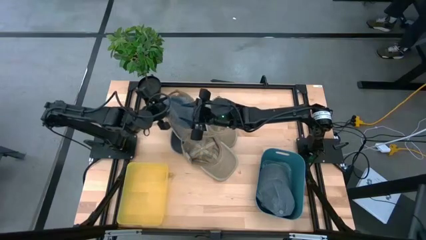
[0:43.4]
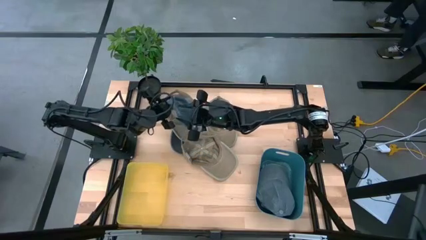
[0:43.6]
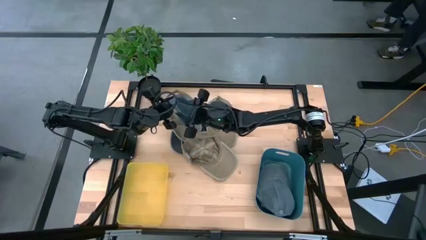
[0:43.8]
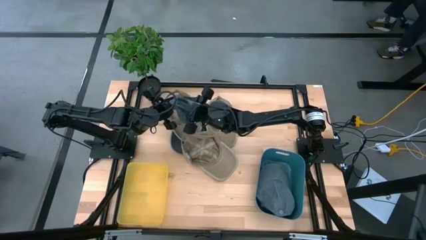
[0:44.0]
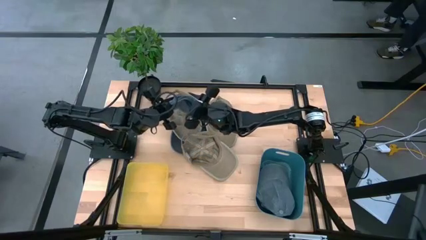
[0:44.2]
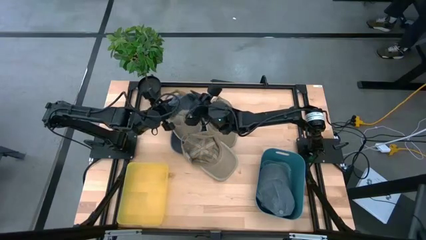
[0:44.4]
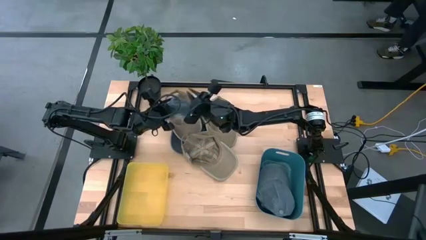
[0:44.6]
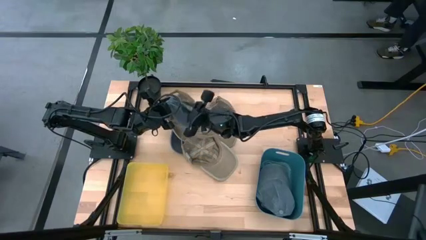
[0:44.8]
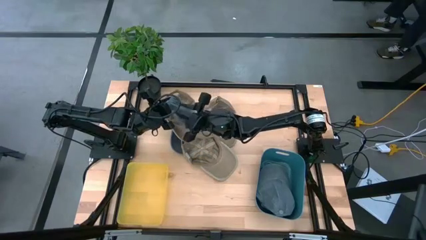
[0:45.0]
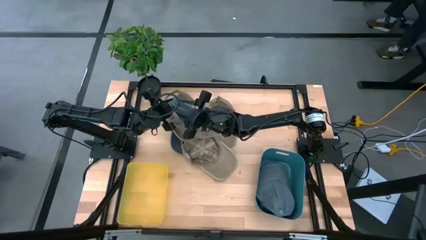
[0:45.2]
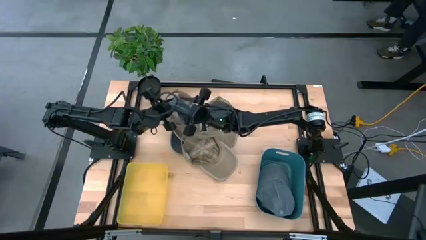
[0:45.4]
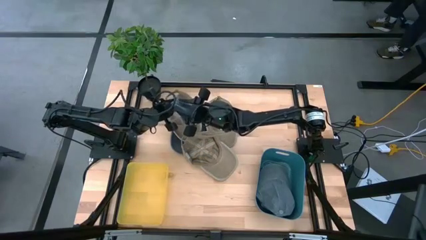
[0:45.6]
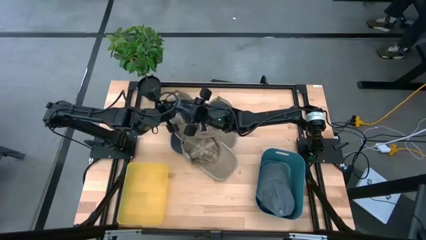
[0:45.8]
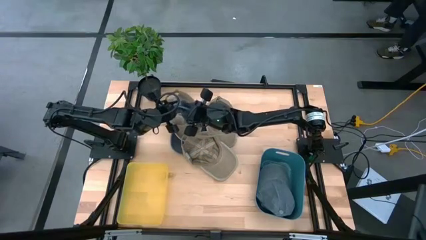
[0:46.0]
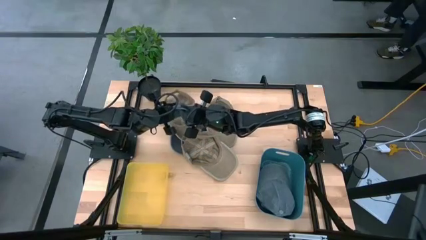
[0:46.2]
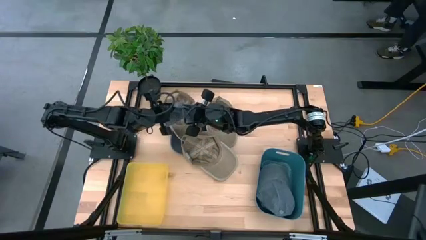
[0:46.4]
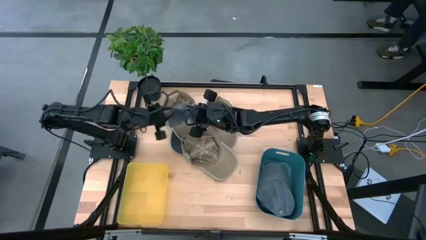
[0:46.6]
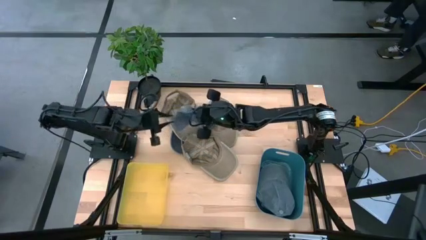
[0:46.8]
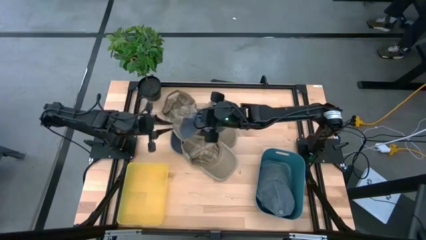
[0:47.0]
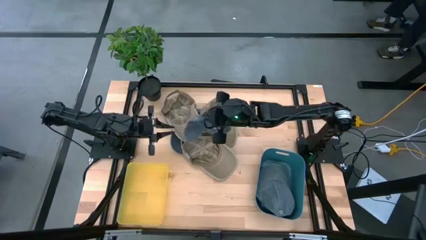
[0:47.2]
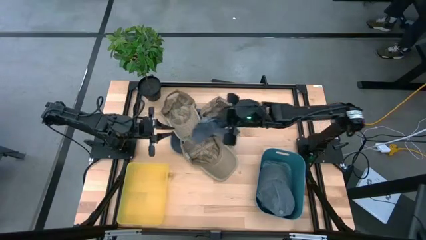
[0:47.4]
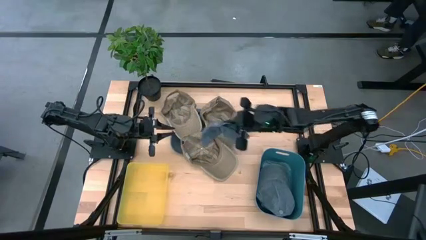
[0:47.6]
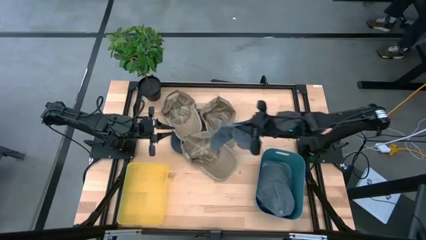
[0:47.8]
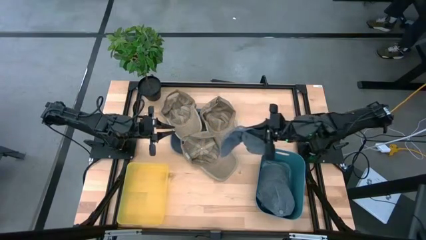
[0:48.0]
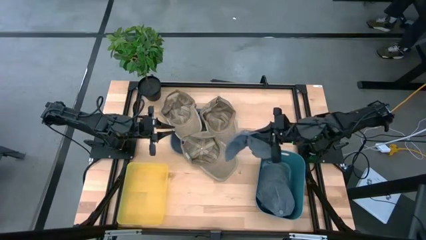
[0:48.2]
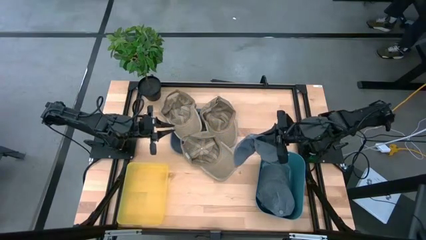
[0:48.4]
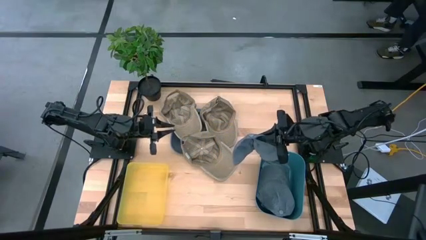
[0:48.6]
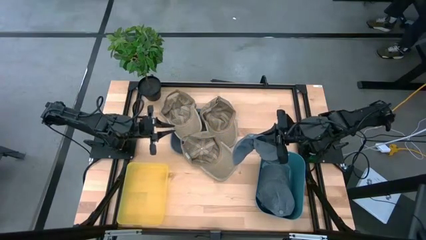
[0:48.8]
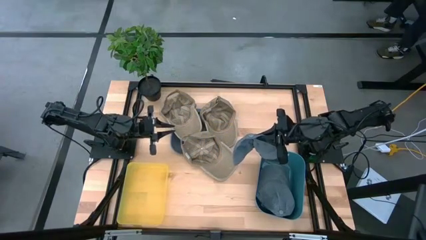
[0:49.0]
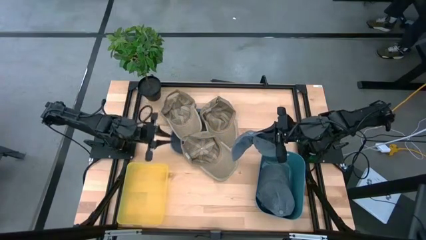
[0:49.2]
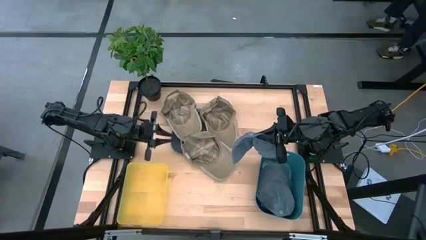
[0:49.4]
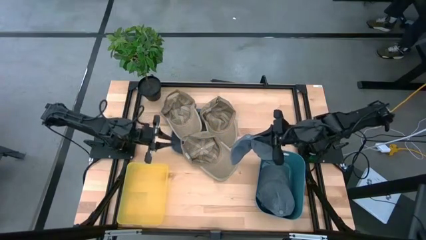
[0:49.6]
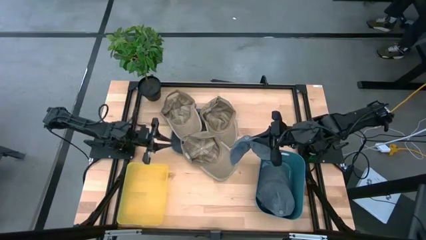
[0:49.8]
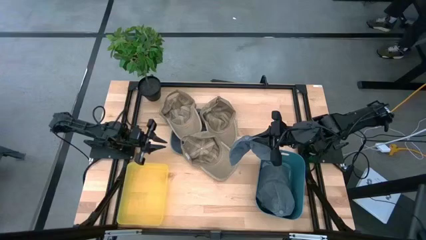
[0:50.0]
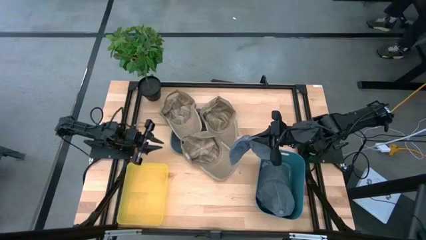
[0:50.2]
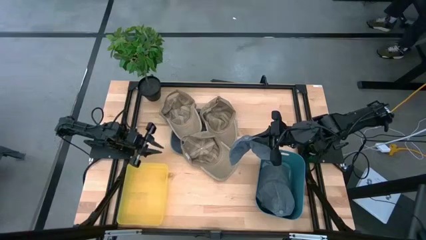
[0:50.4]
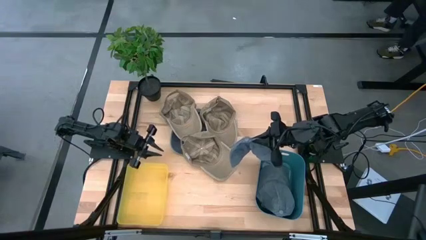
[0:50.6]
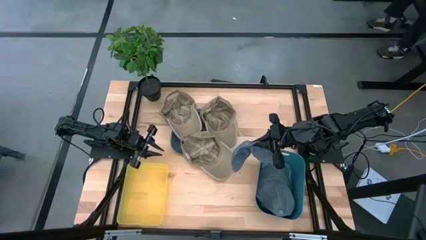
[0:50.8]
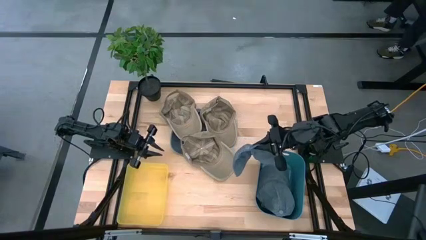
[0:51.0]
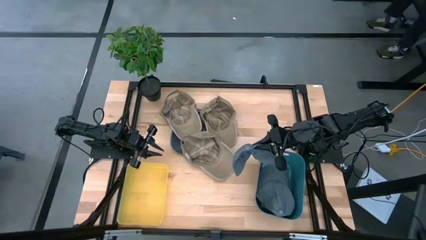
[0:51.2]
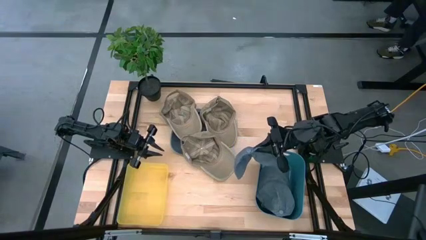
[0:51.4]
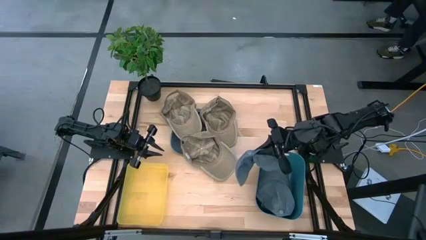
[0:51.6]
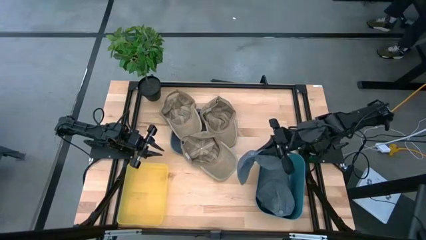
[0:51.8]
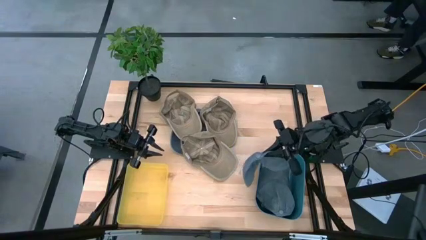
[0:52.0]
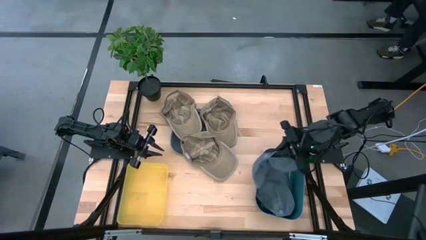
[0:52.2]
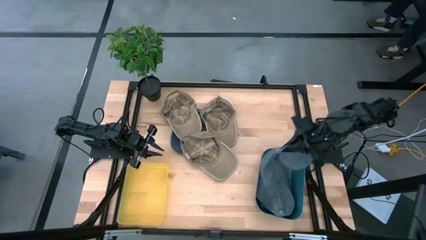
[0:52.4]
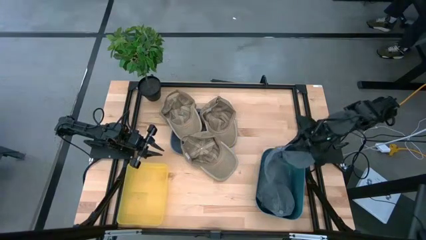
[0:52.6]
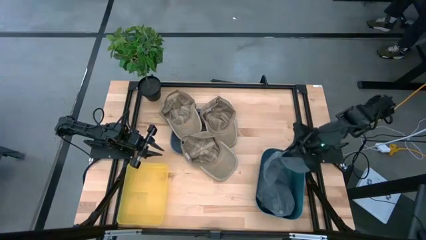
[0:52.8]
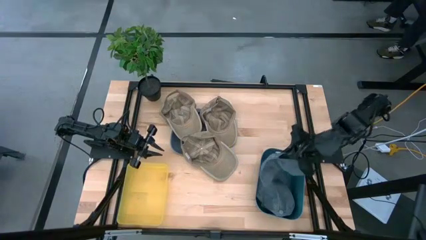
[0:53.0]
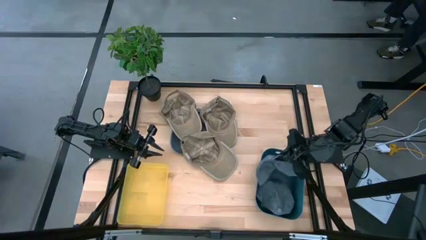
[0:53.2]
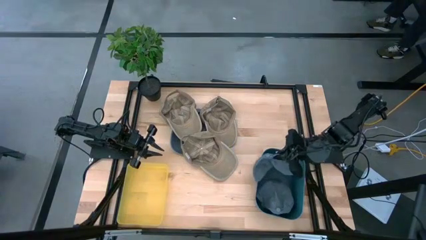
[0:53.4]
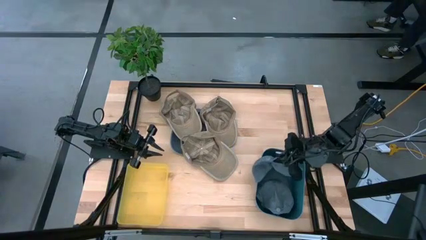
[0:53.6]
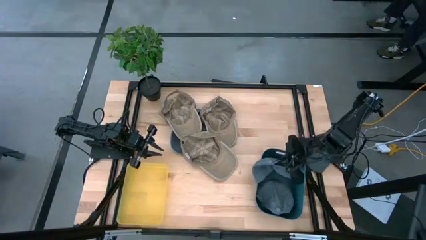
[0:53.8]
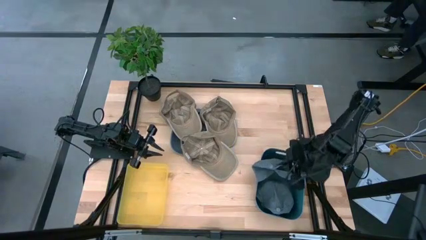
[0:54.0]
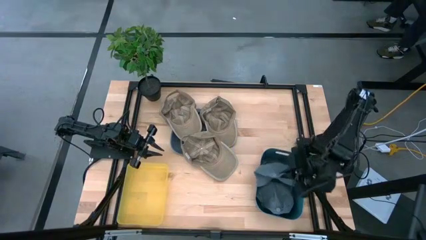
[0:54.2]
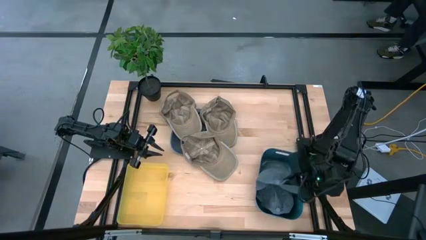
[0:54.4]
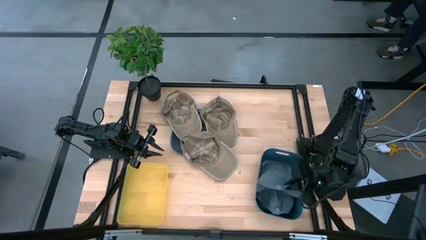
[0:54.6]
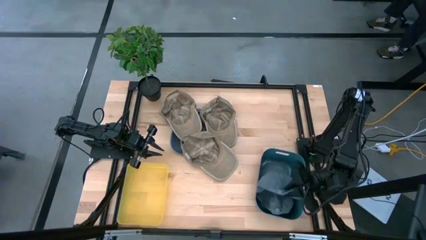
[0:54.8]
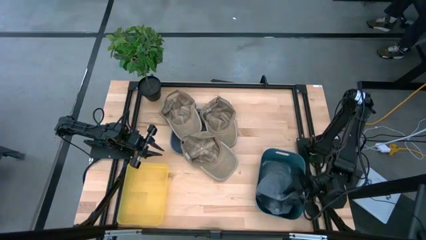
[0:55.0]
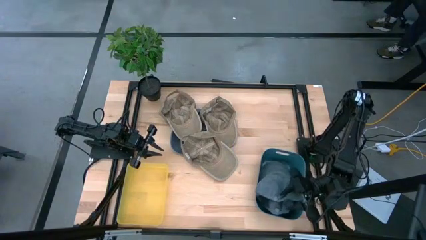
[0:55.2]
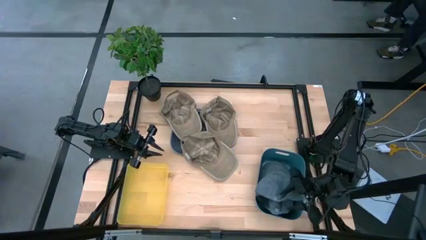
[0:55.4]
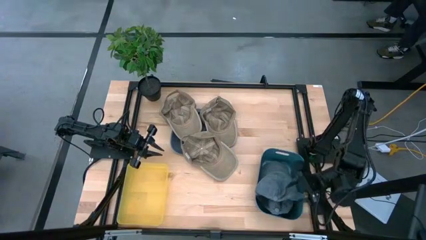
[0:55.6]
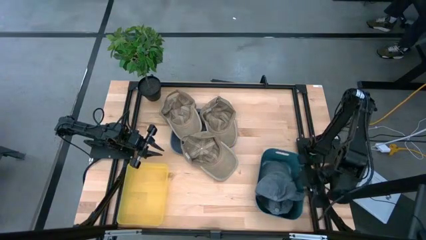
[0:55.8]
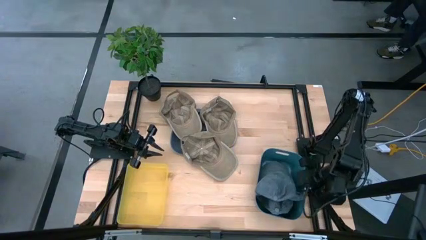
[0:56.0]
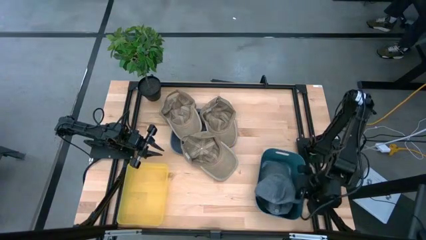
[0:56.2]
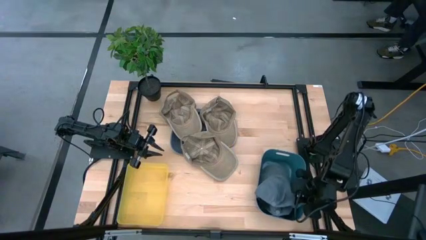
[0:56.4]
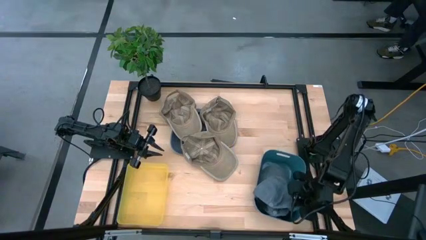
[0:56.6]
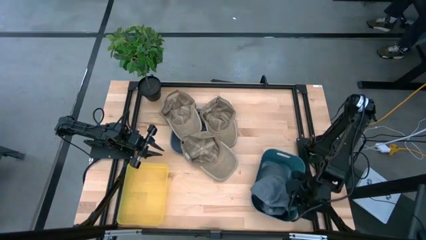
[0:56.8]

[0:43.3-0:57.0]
Task: Pick & Place hat
Put the right blue cap into the blue bin
